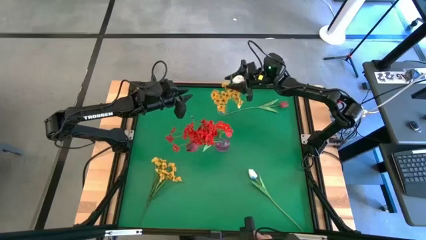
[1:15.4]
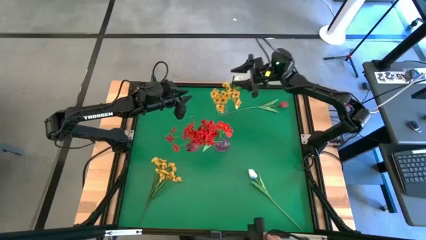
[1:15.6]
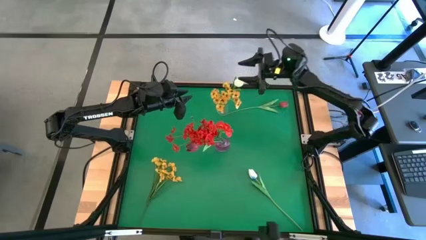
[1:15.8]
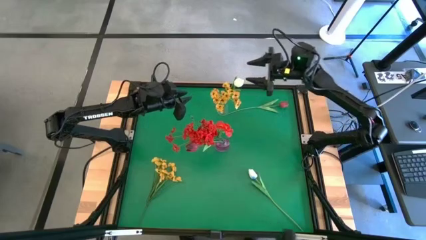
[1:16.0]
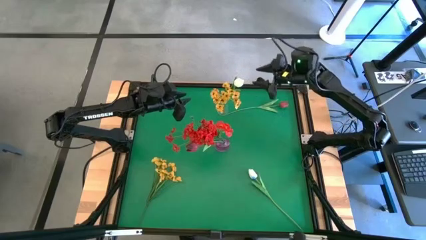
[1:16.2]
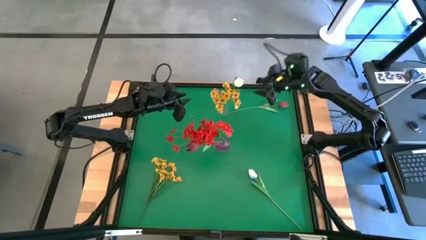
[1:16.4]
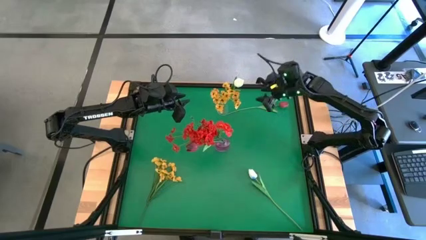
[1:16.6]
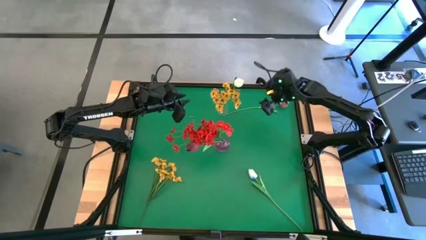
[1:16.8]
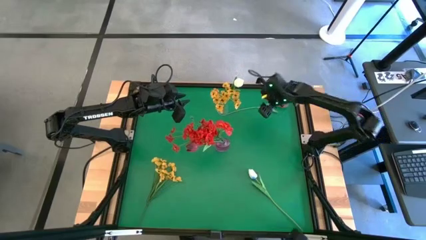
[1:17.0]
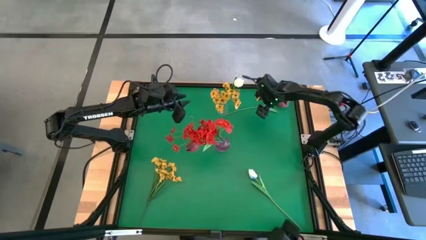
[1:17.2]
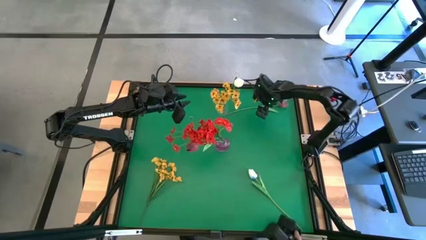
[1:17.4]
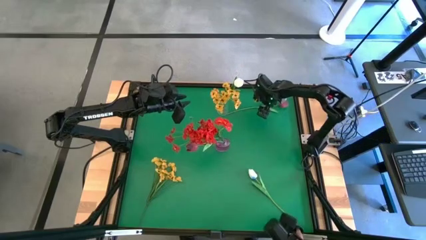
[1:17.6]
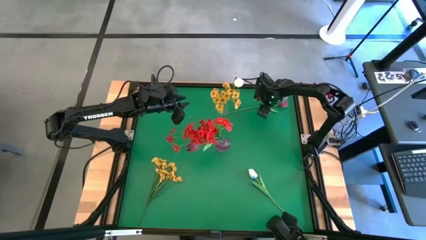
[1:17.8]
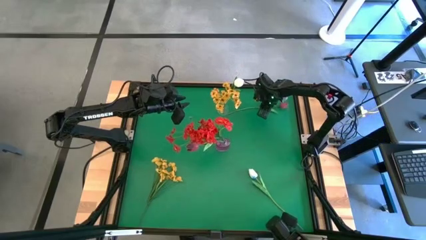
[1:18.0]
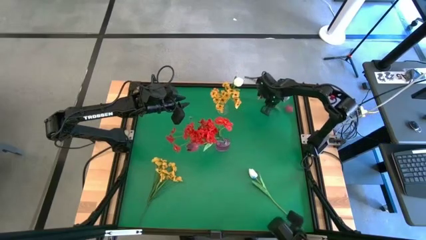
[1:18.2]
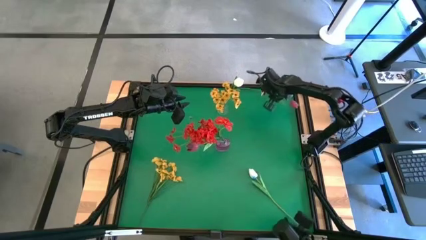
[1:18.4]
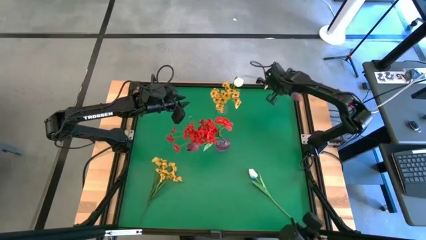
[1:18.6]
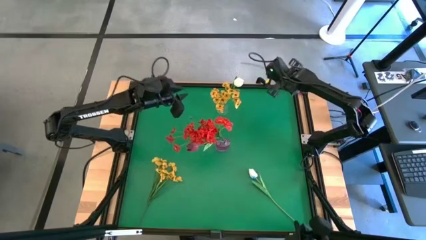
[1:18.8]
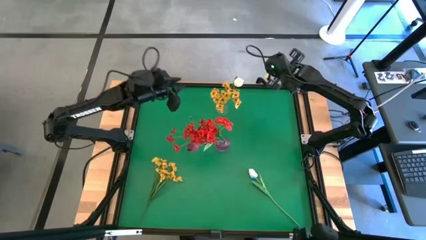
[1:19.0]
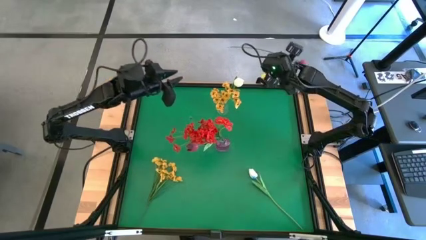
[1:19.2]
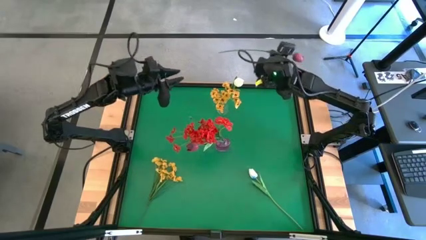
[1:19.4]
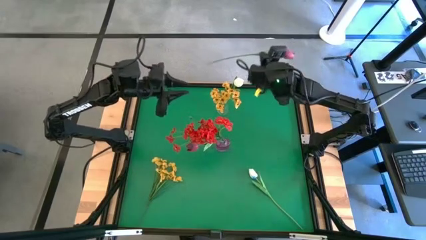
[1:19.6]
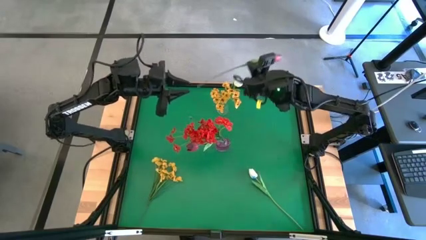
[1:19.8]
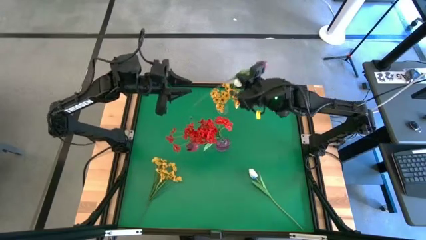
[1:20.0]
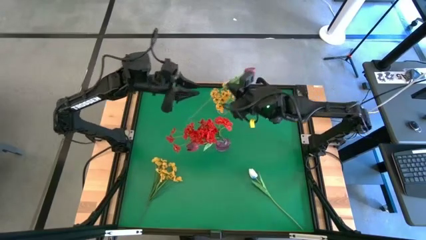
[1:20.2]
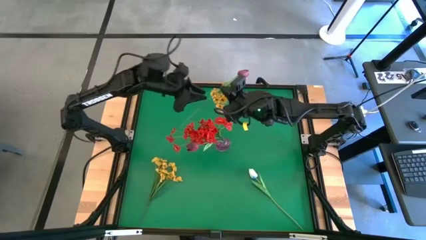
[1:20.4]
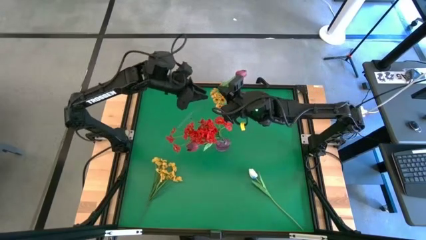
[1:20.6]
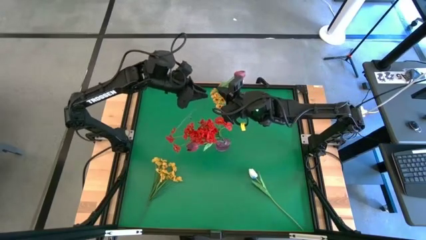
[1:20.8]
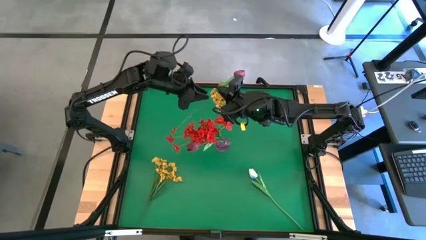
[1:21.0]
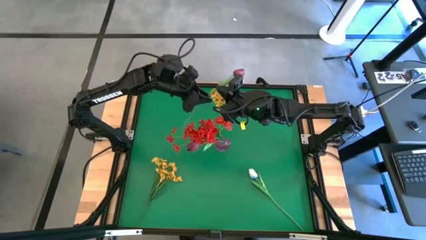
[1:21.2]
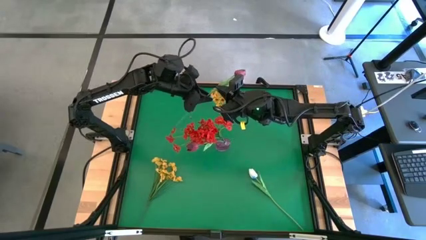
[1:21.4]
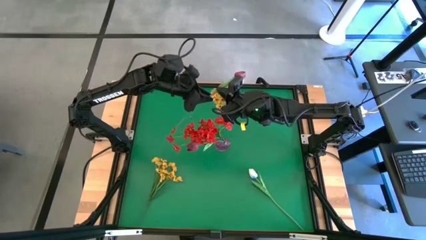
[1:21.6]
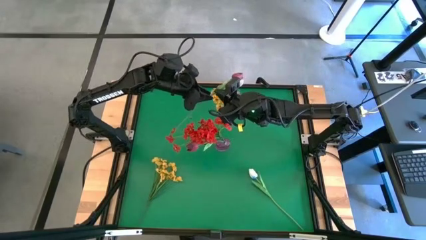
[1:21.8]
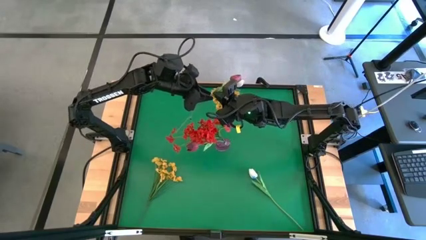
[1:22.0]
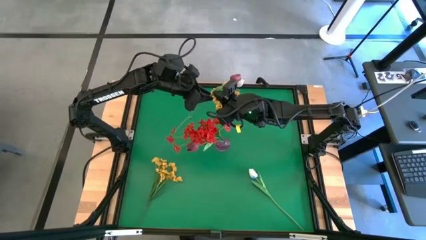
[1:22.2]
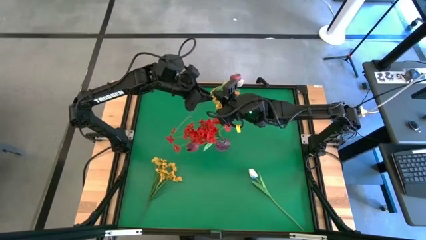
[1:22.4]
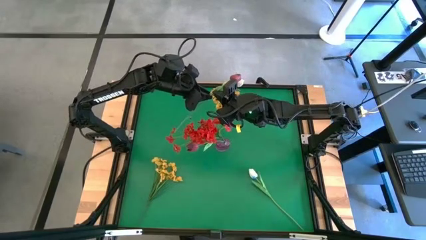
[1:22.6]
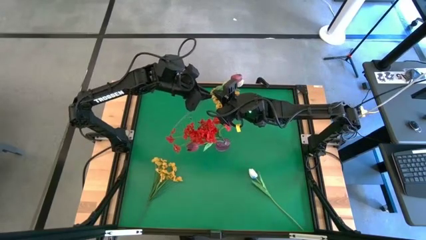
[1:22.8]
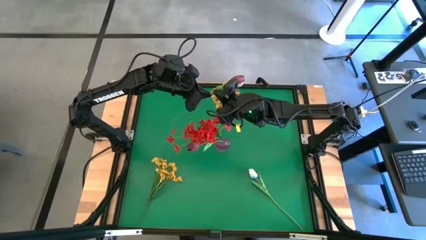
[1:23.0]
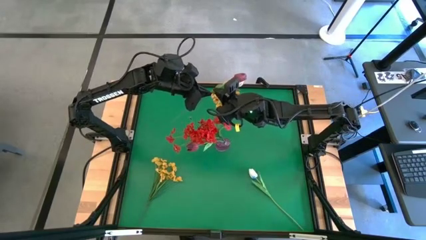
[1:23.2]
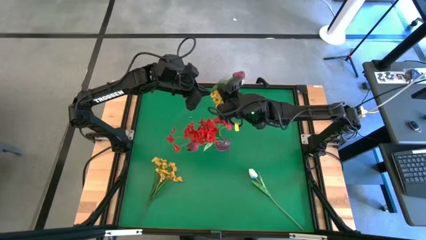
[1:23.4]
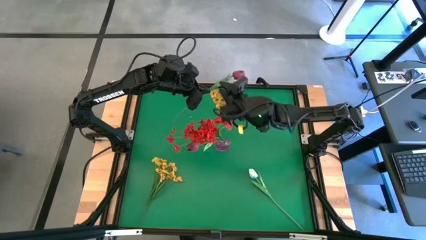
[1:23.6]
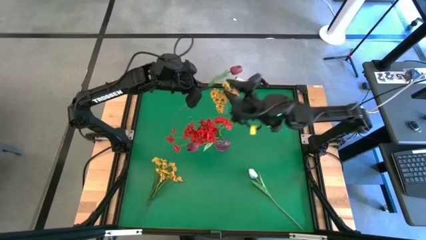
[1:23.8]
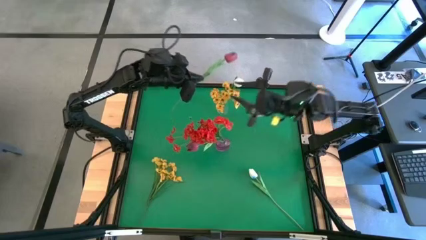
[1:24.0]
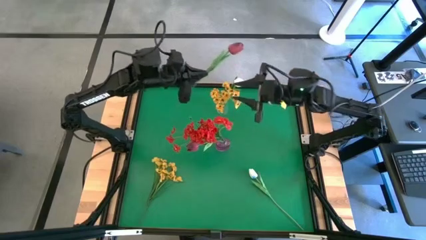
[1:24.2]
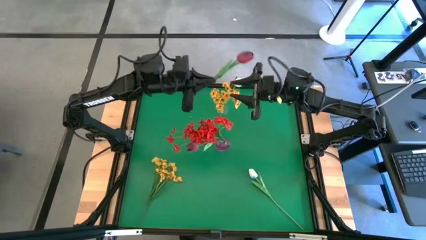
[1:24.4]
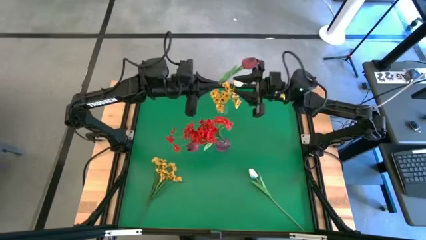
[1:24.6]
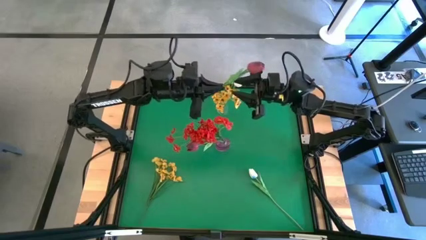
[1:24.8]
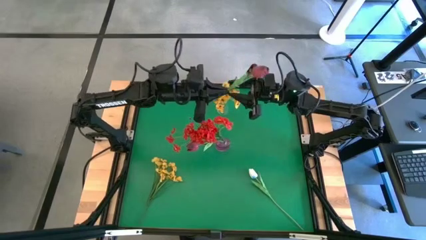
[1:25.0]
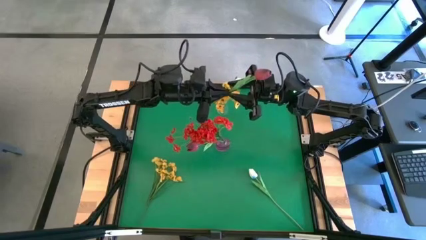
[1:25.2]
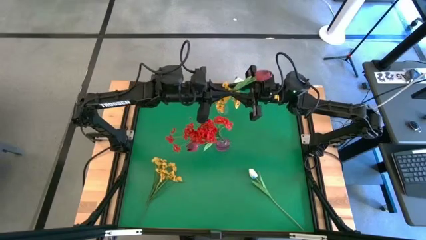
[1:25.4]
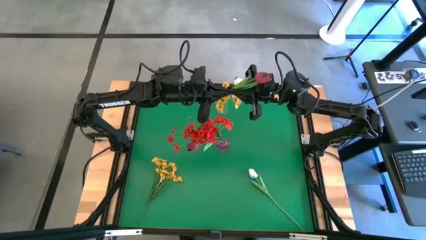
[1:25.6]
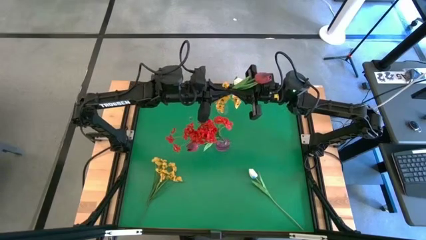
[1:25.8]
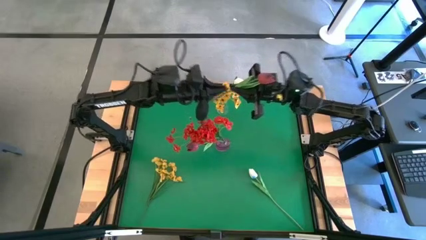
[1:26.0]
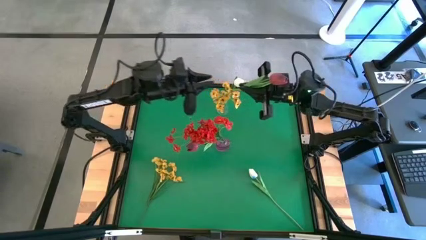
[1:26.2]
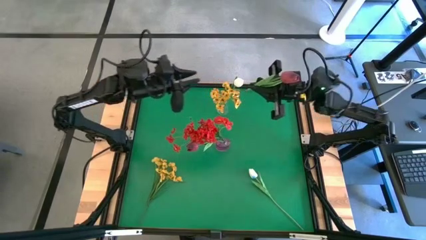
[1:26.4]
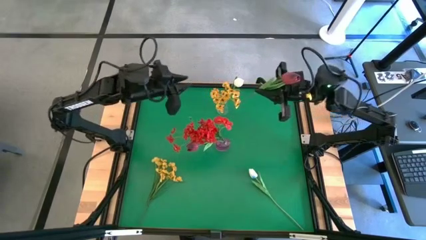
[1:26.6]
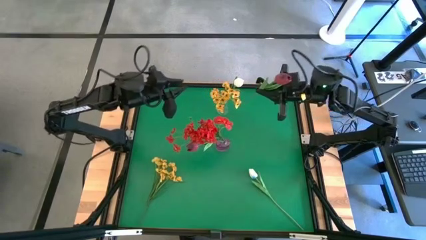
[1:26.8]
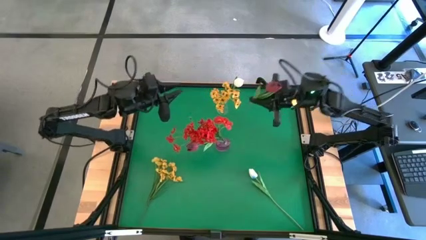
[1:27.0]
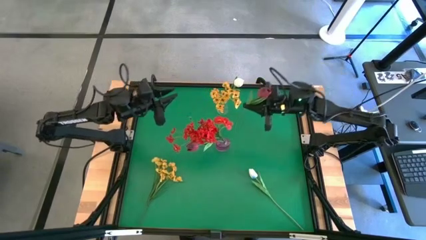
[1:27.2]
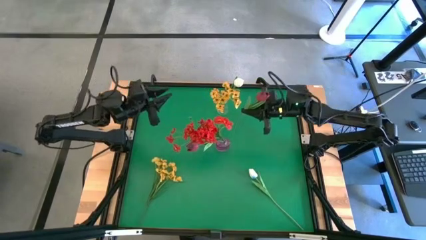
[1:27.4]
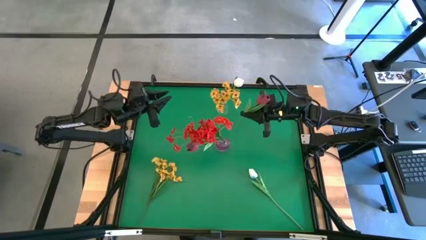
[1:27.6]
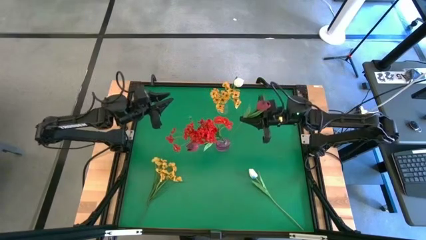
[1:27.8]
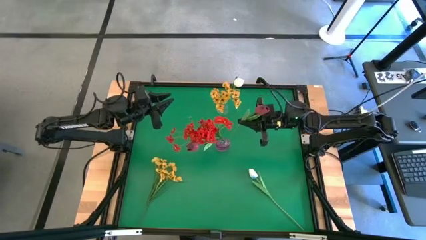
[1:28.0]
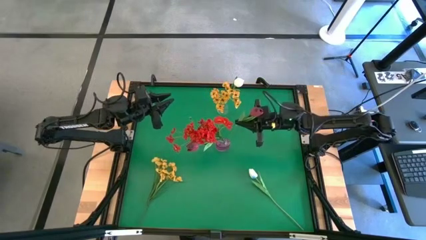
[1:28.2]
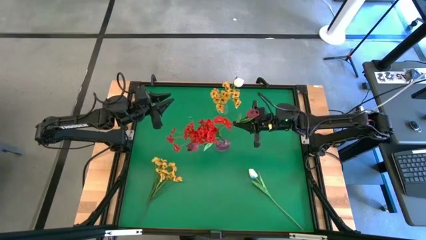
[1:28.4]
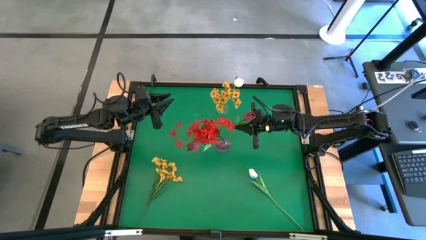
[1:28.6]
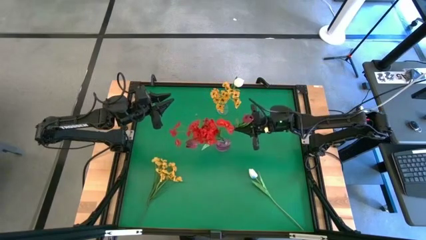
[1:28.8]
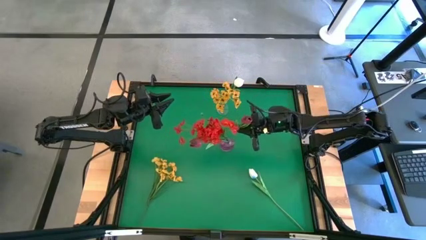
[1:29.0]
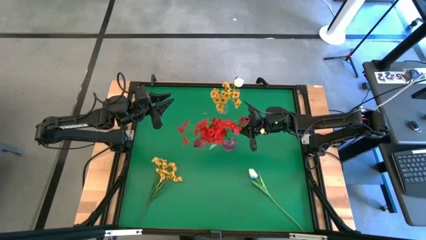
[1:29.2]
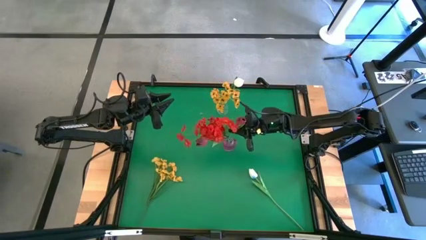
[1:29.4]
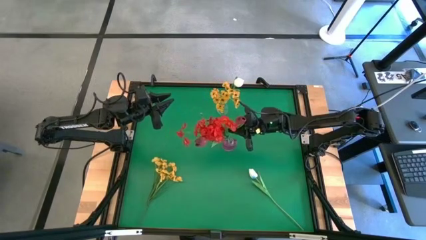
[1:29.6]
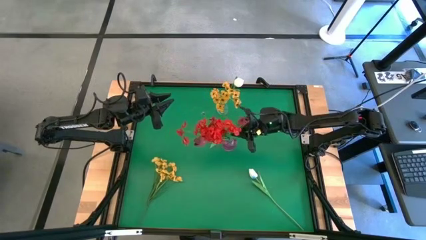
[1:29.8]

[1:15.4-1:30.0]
Task: Sort flowers into vase by color
Put the red flower into the pink vase

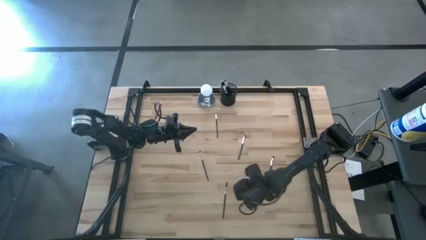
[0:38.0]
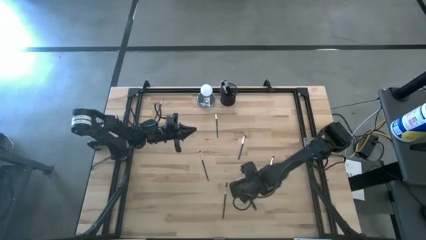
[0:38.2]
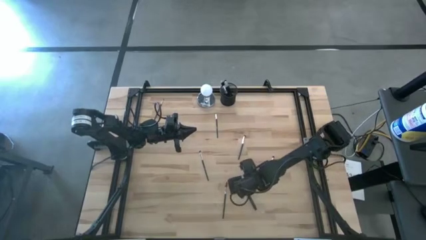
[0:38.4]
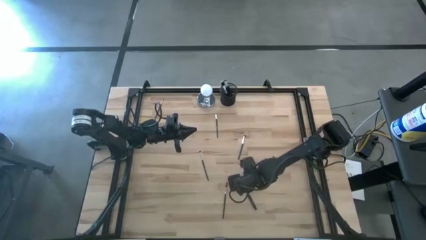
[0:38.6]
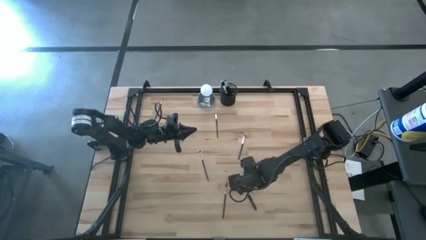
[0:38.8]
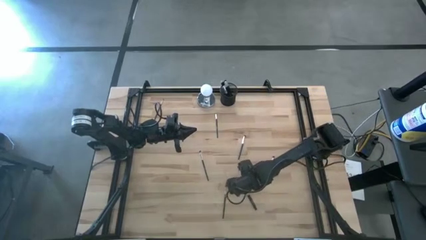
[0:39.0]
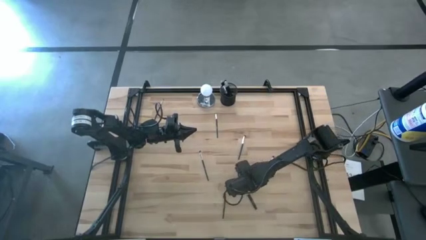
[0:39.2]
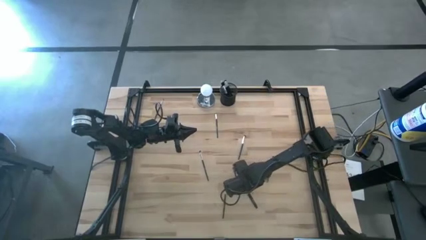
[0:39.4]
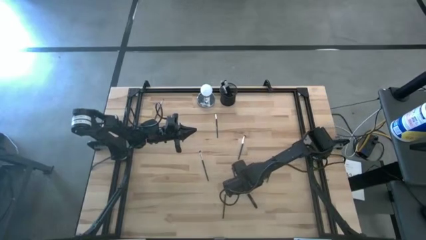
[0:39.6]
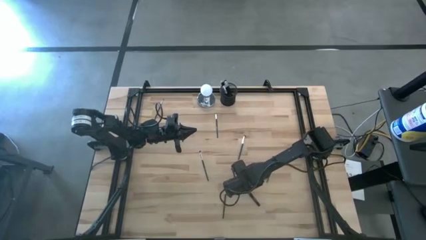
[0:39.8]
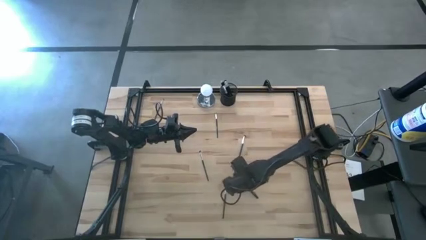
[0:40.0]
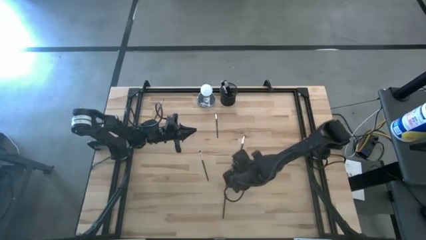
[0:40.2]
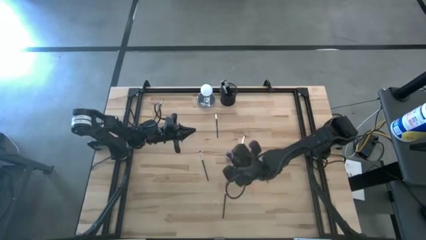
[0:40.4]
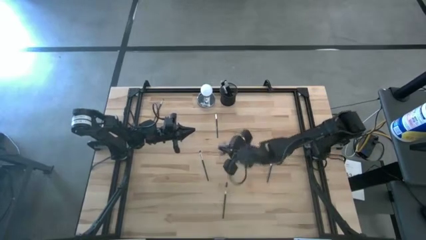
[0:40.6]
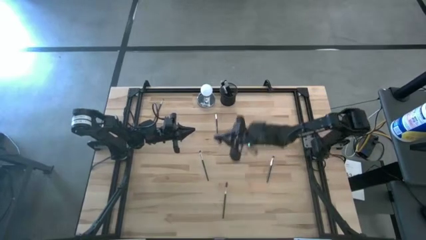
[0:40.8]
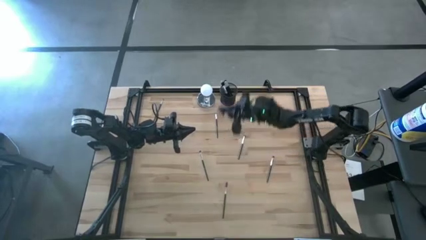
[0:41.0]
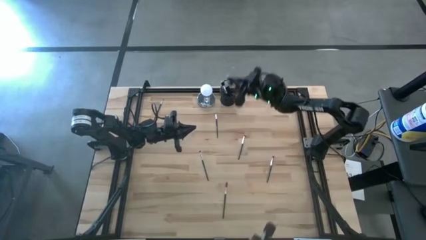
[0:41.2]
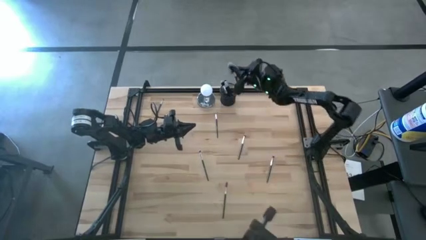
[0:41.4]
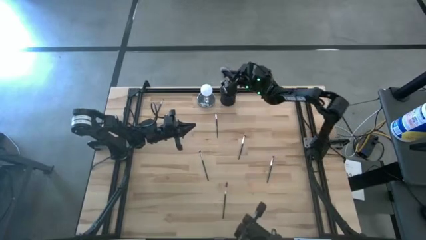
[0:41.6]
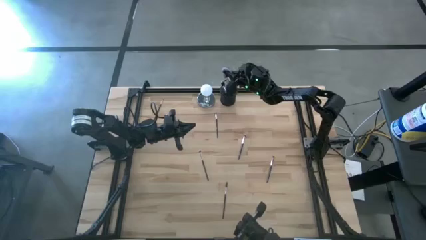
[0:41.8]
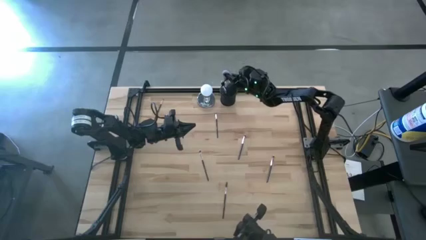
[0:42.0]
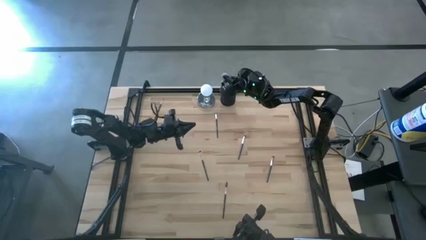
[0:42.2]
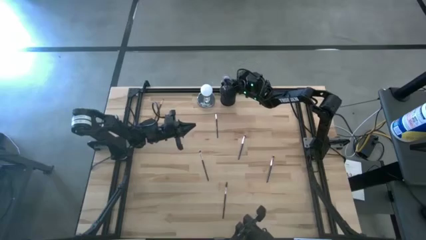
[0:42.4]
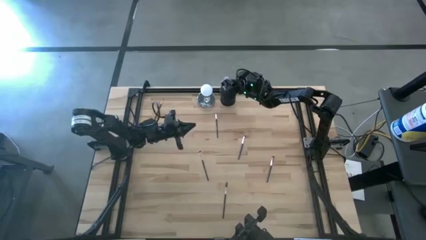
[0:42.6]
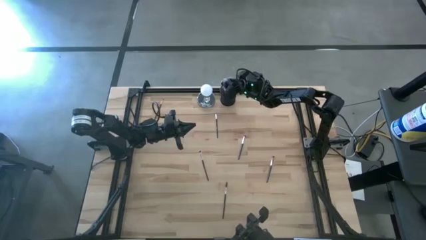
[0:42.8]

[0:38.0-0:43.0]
Task: Pick & Place Makeup Supplies
Put the makeup brush into the black makeup holder
